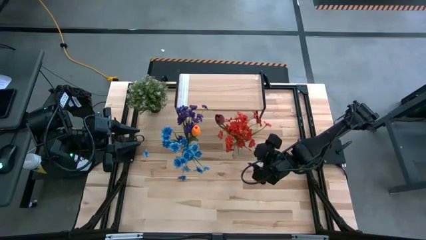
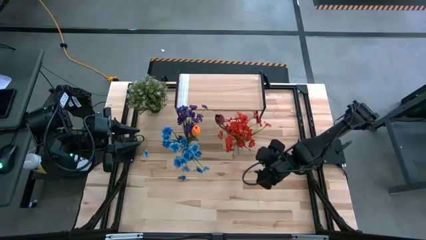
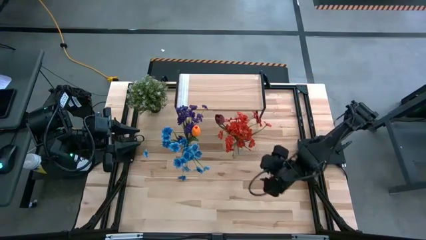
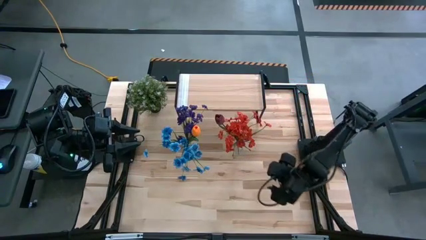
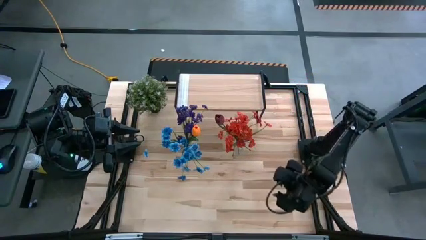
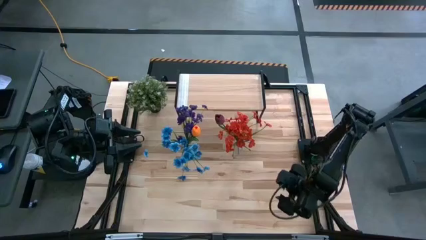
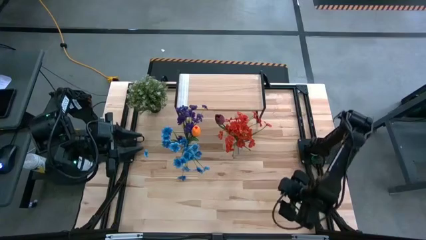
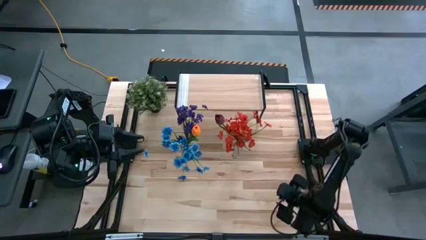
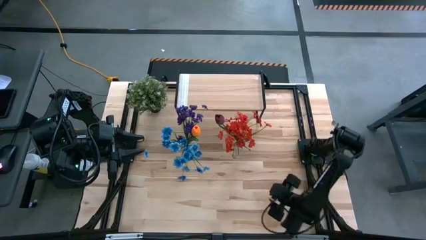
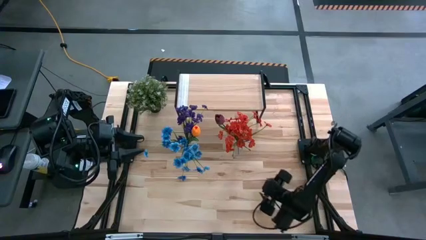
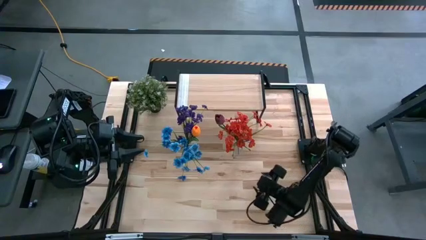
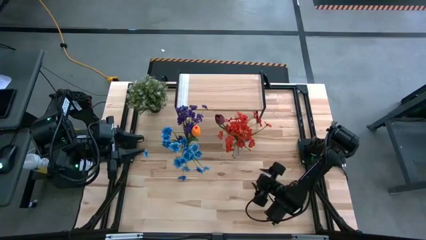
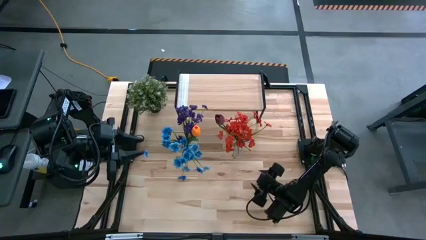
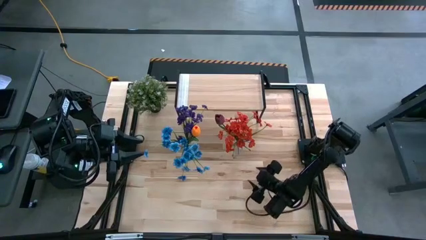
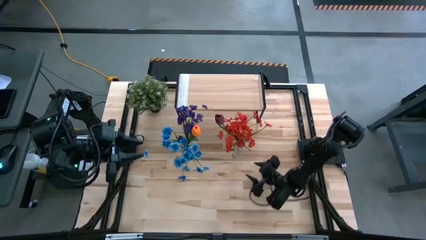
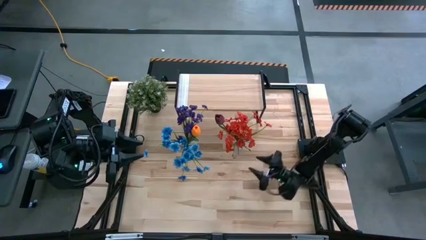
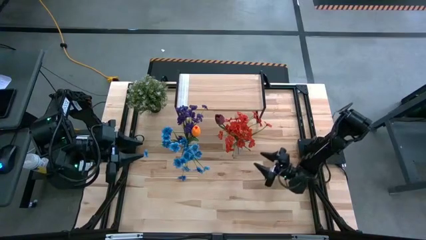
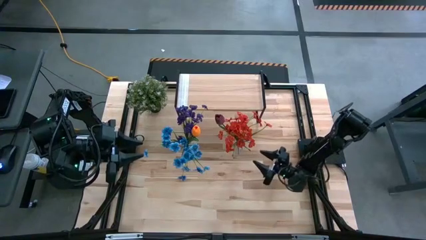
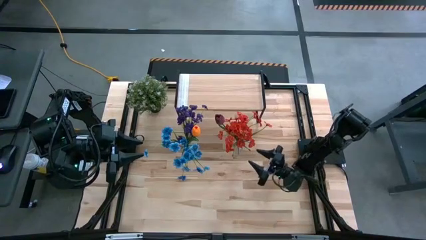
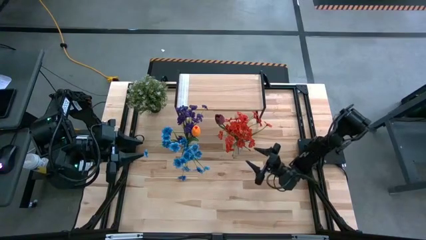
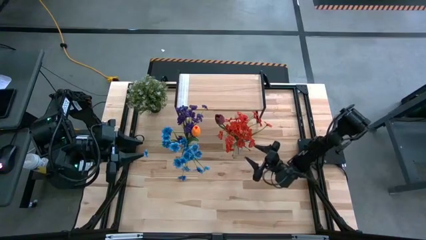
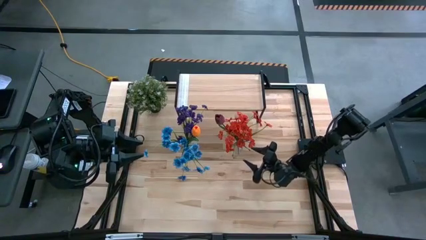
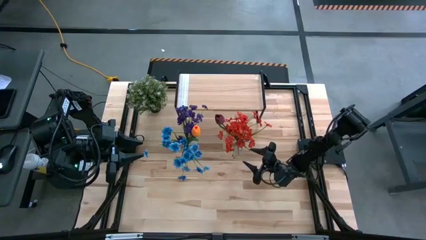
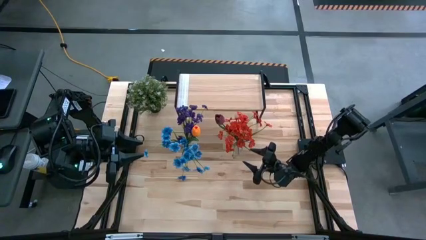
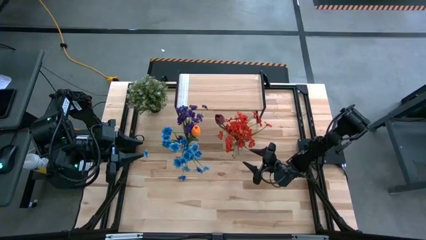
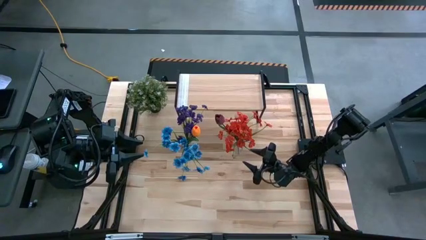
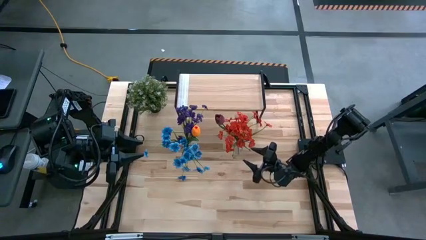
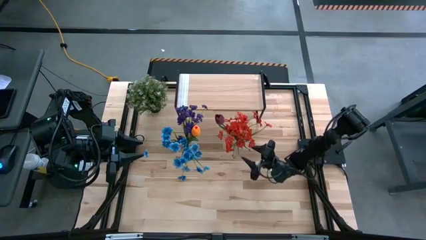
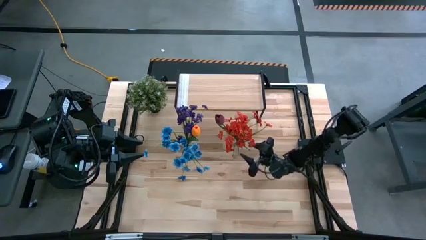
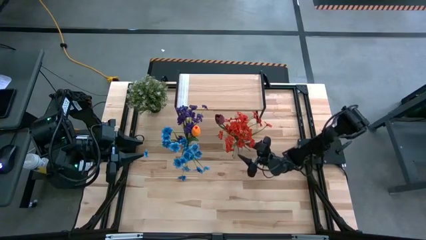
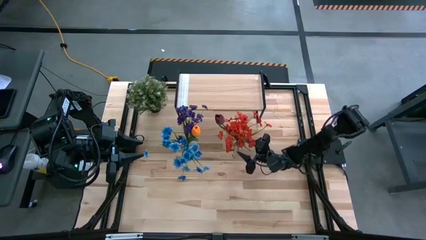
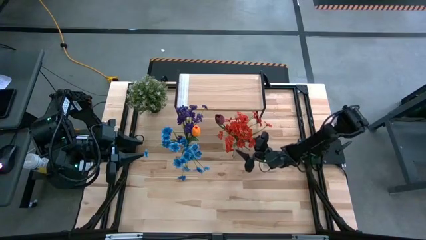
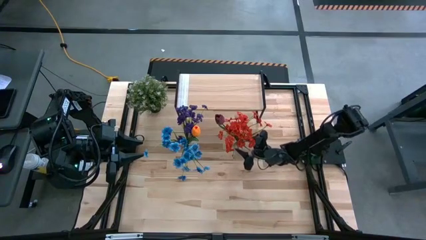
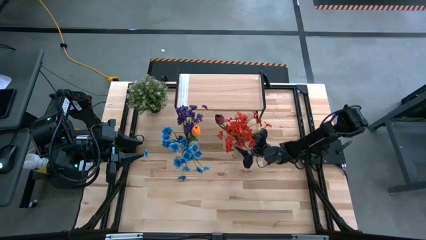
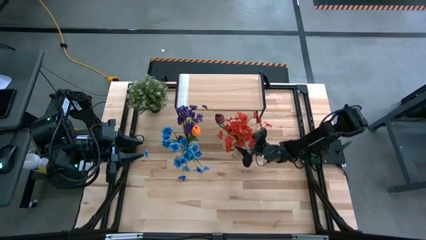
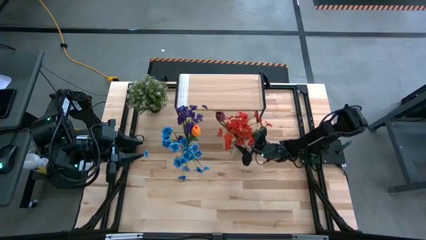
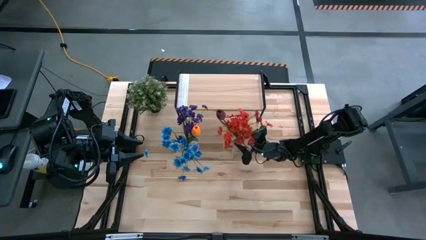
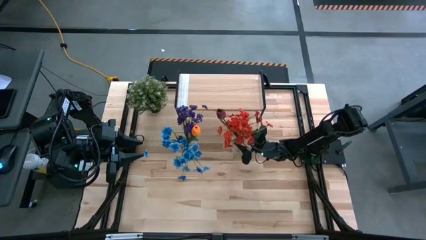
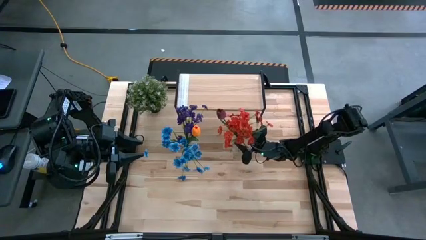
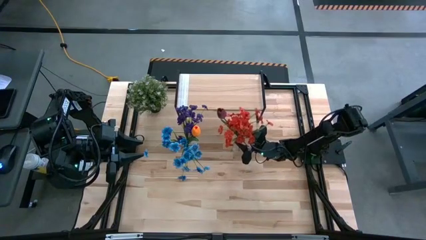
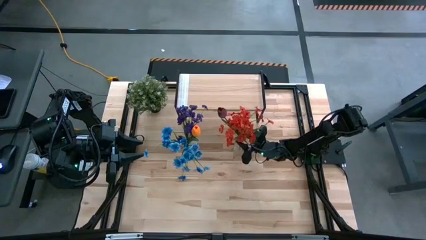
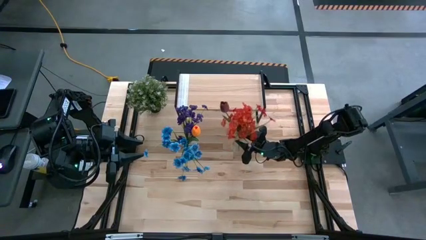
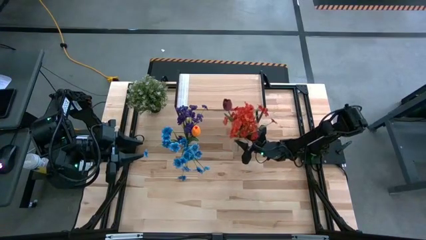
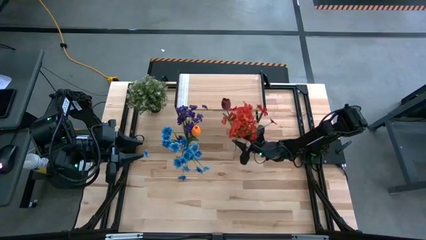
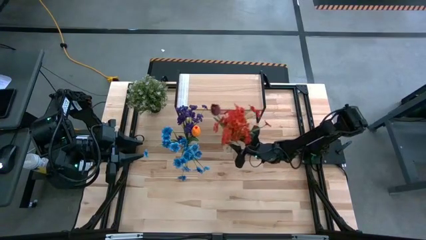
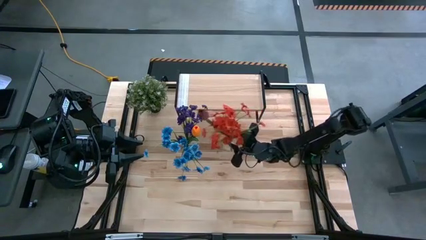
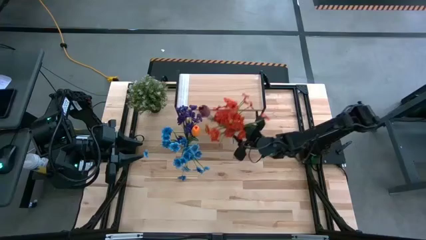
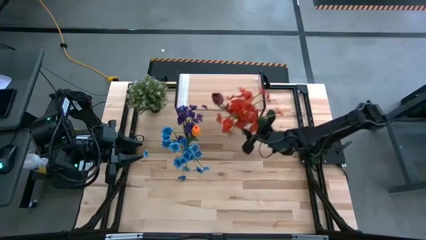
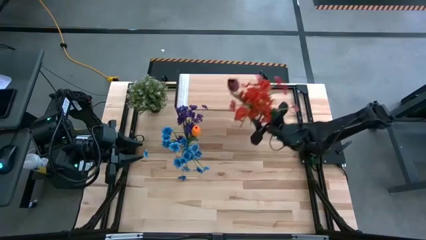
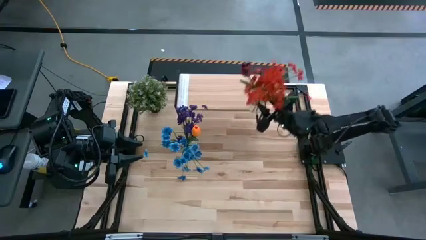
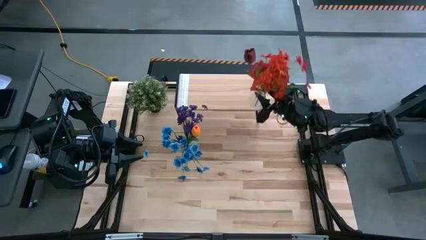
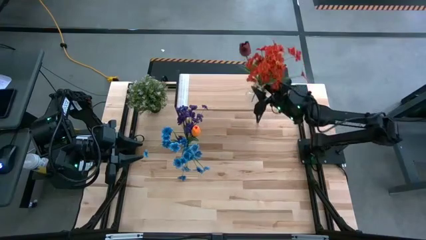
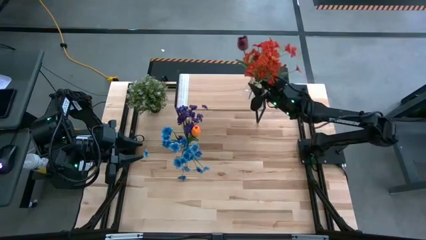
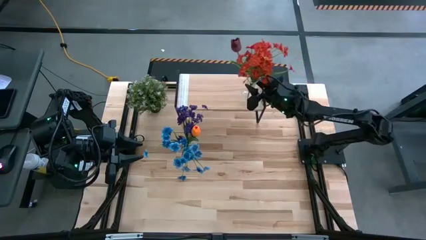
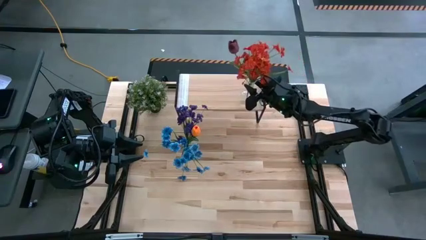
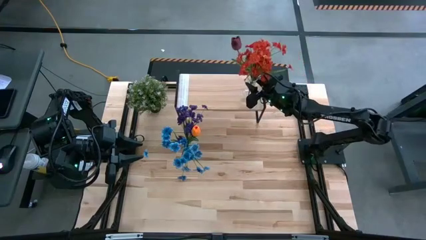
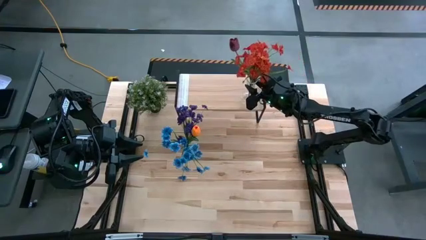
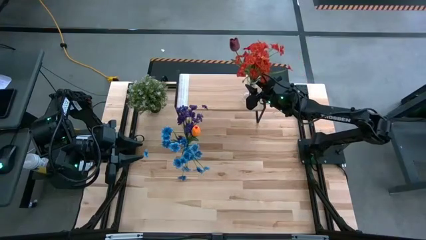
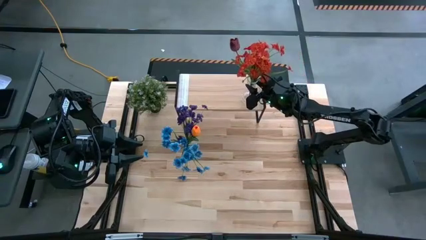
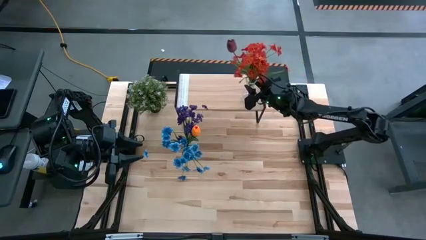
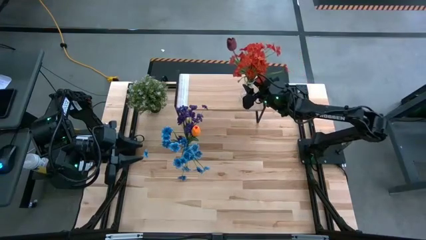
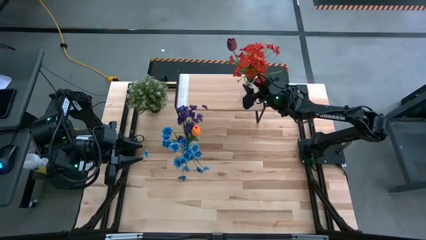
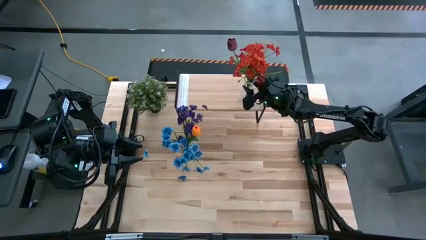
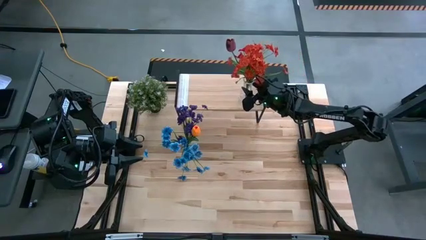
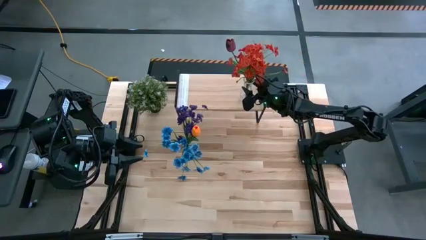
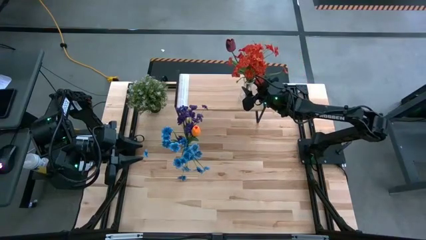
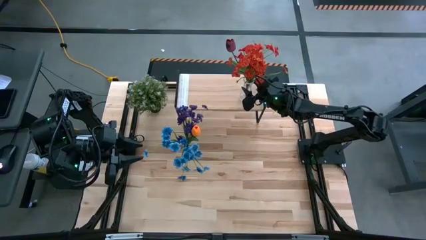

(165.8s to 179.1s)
Task: Pick and place flowers into a vace then onto a shelf
Put the right transparent flower vase on the shelf
